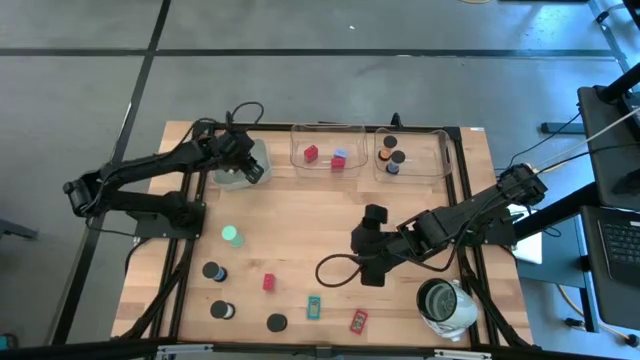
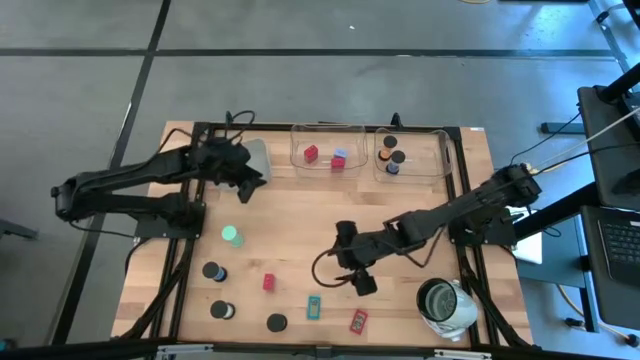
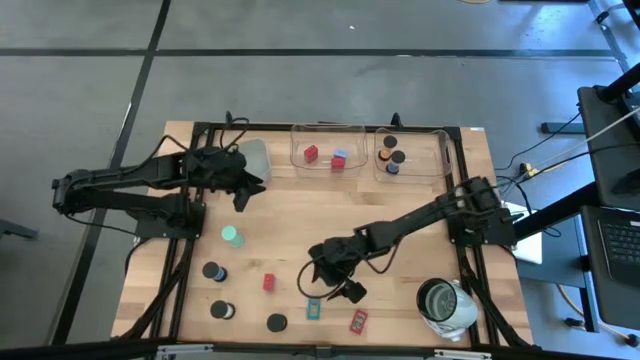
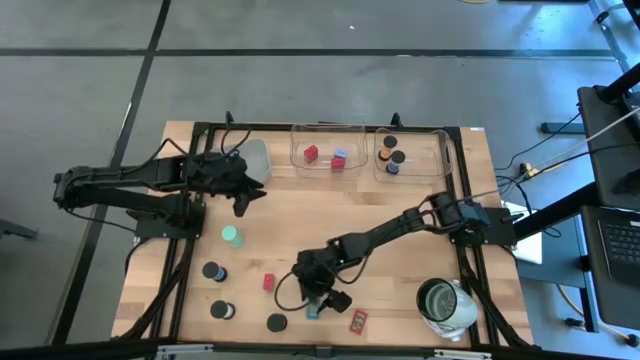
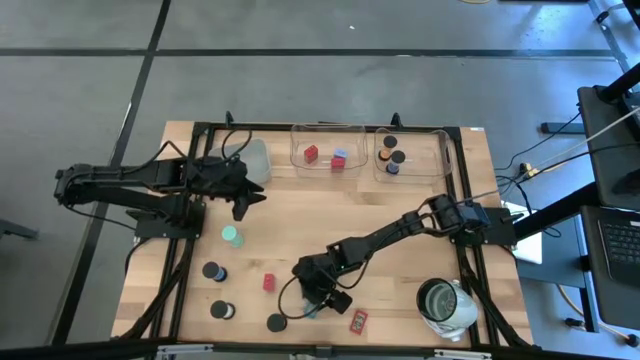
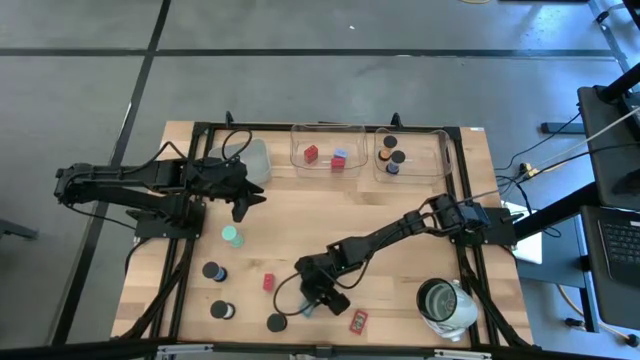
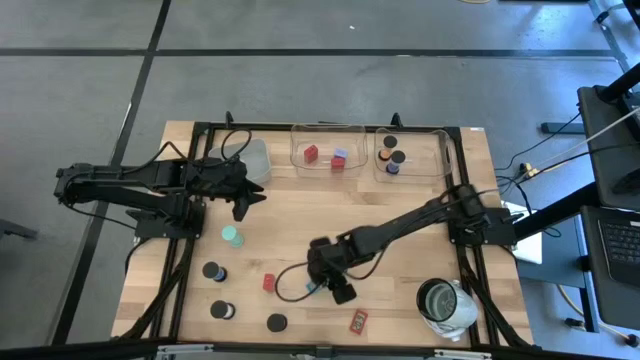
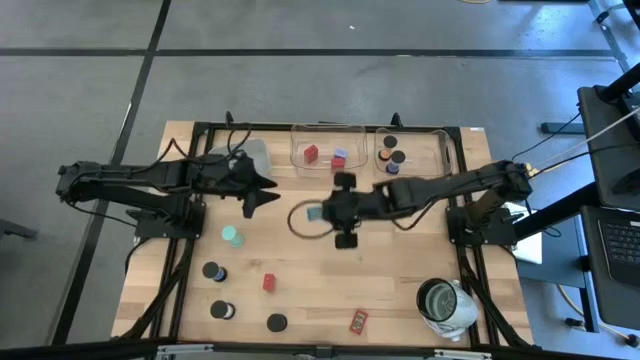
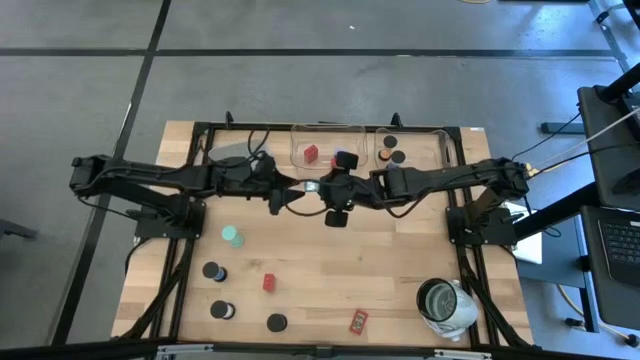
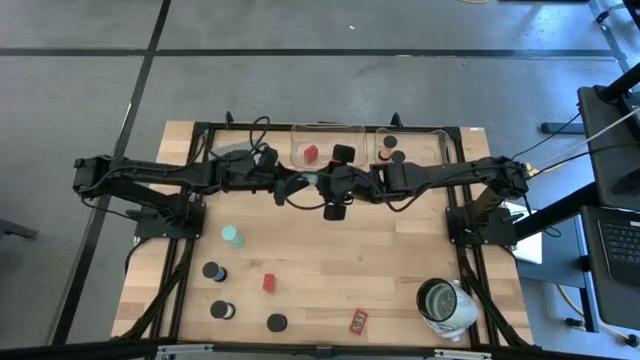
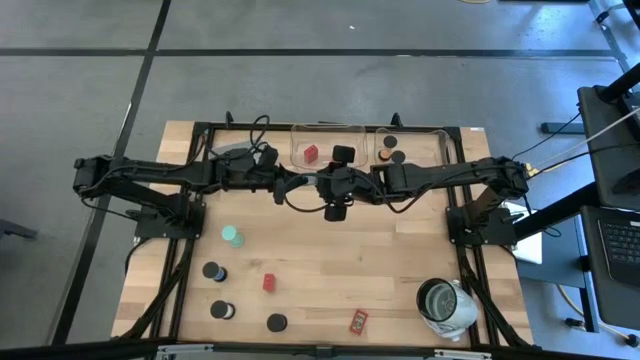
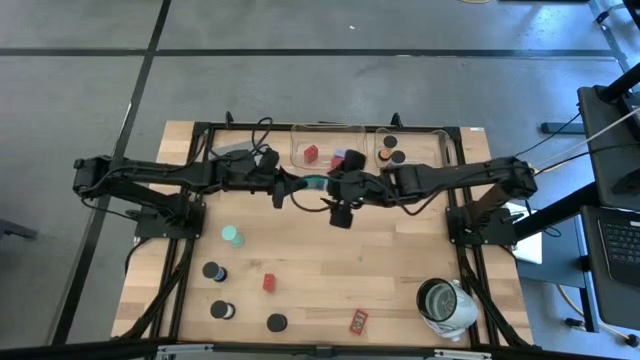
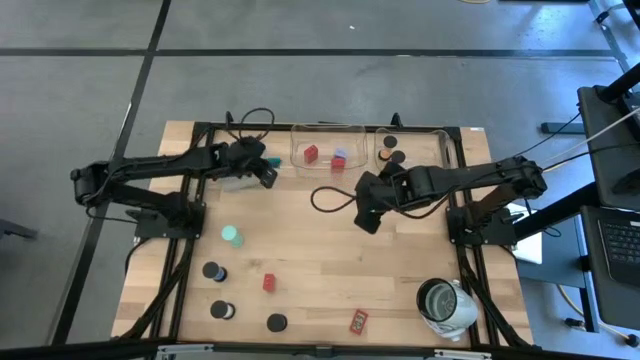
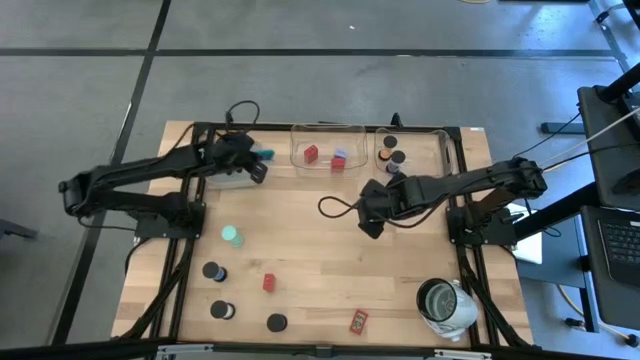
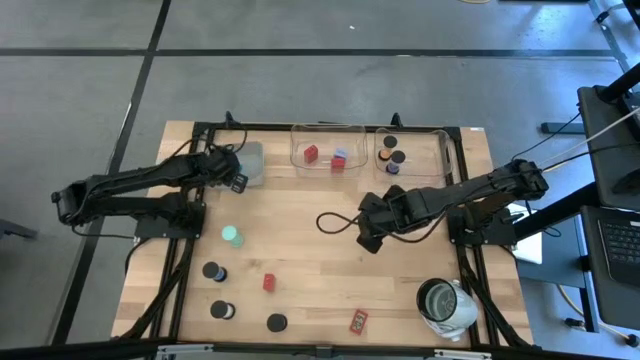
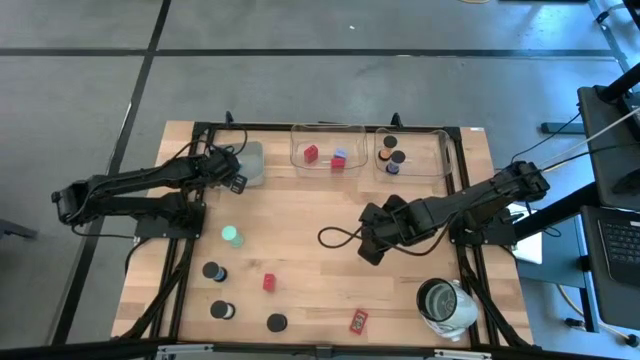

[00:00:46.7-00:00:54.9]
Task: Pick & Place Office items
Put the blue digital timer into the gray bin

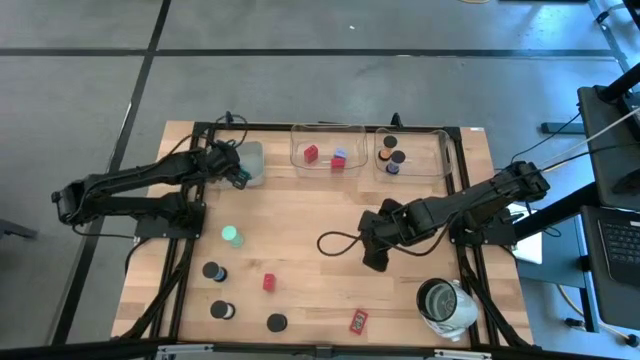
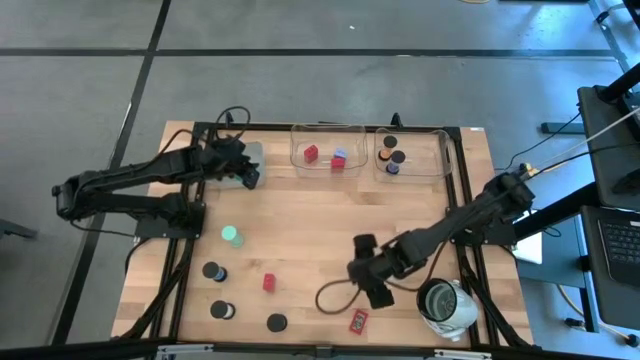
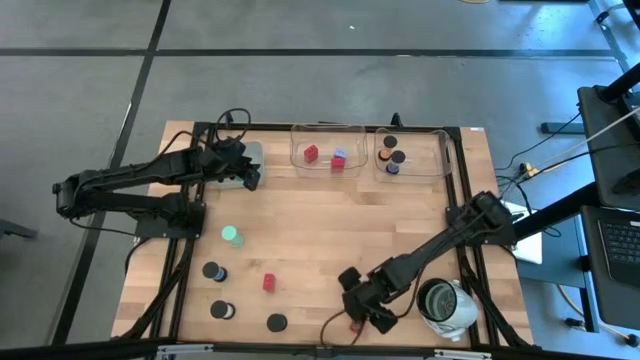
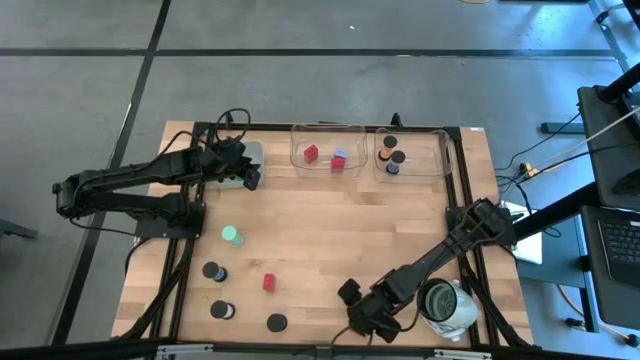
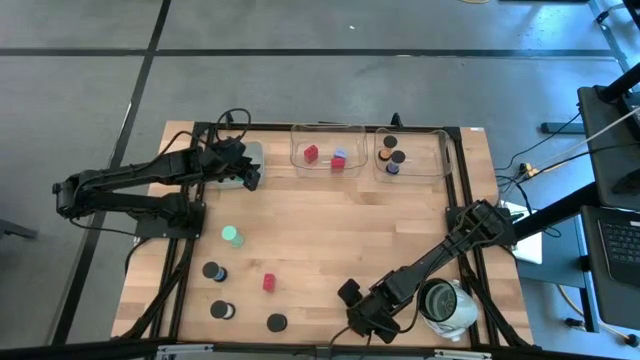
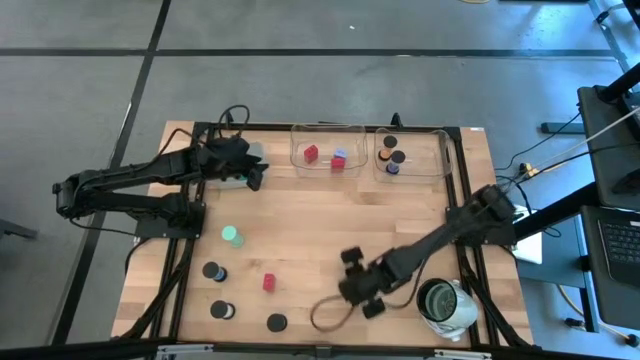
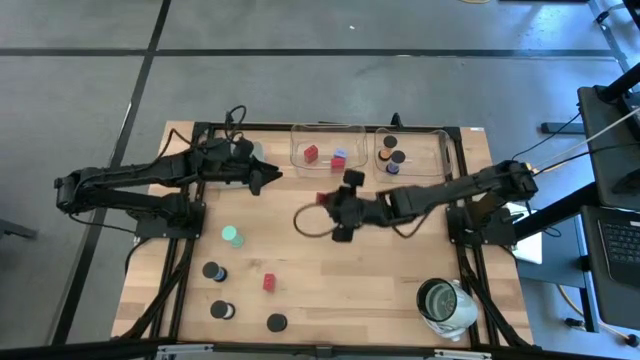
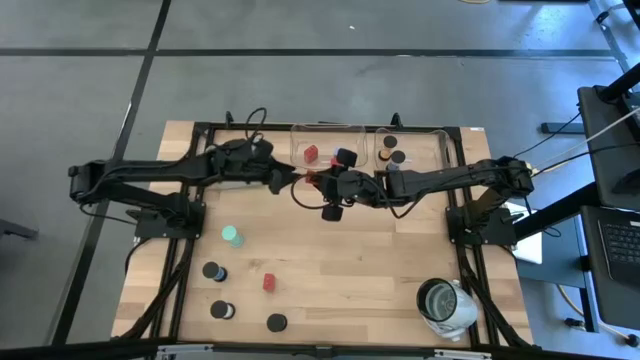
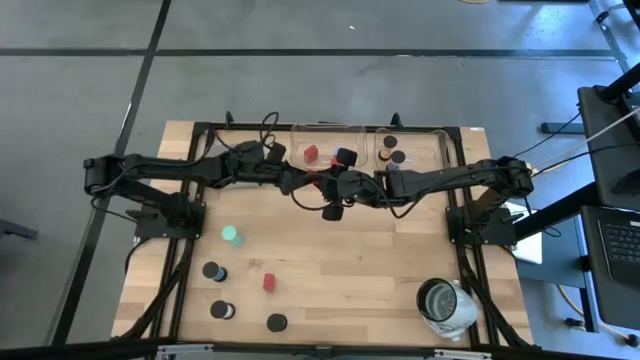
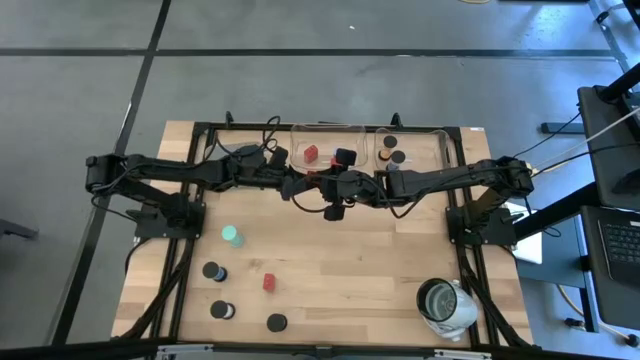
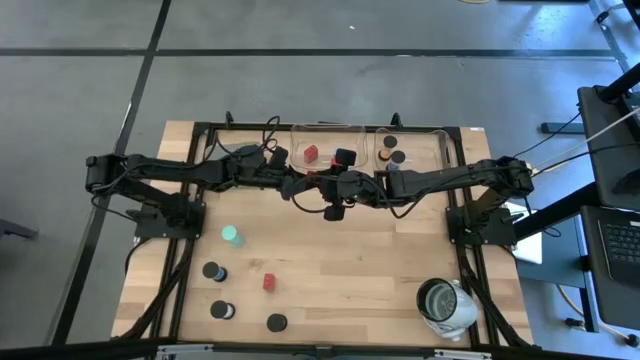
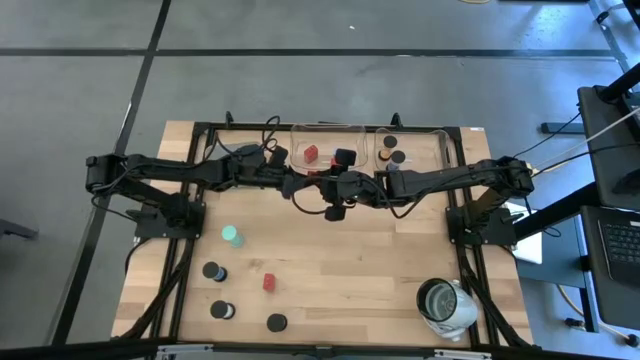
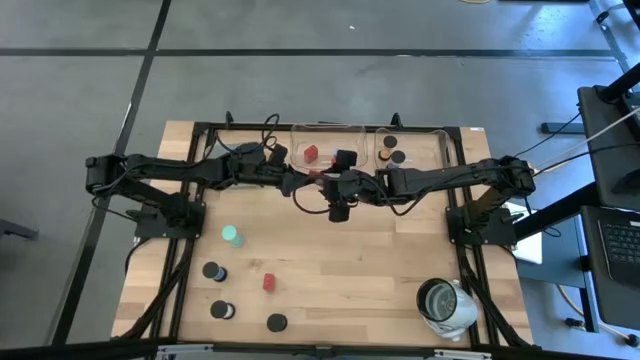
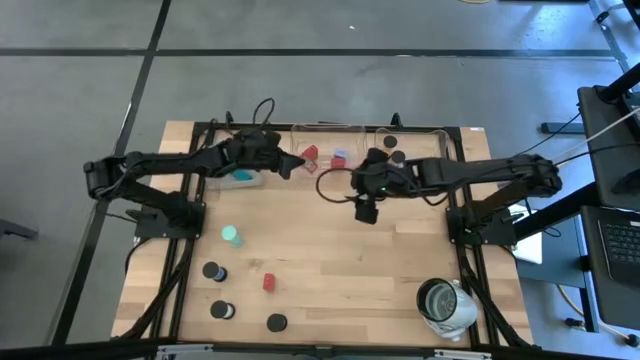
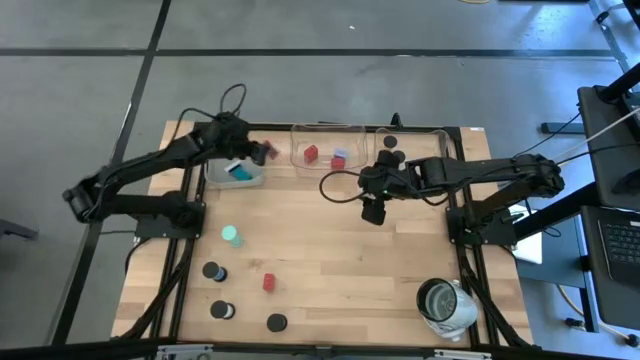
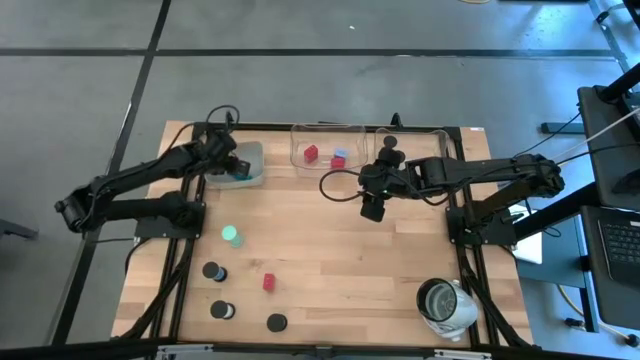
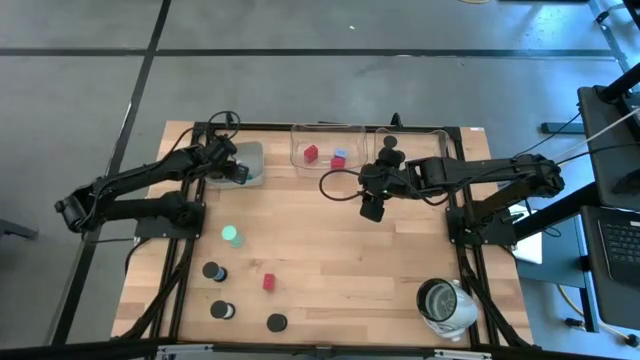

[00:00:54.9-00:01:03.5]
Put the red digital timer into the gray bin

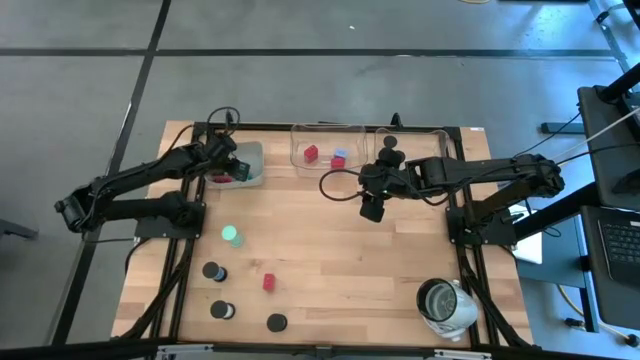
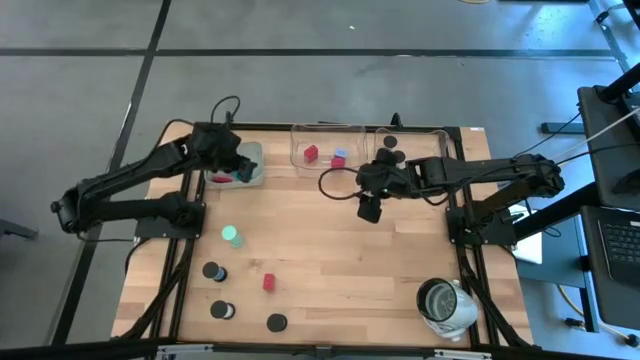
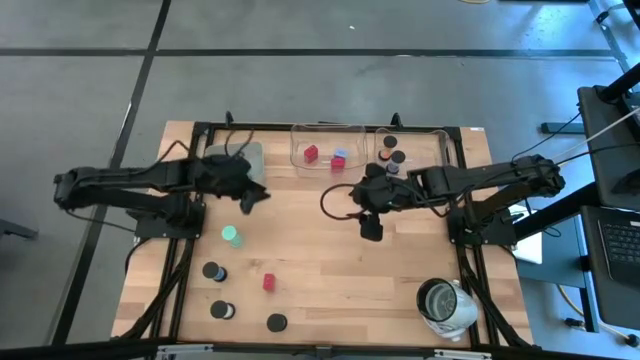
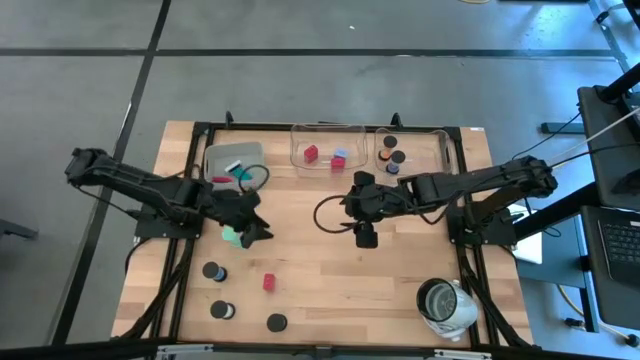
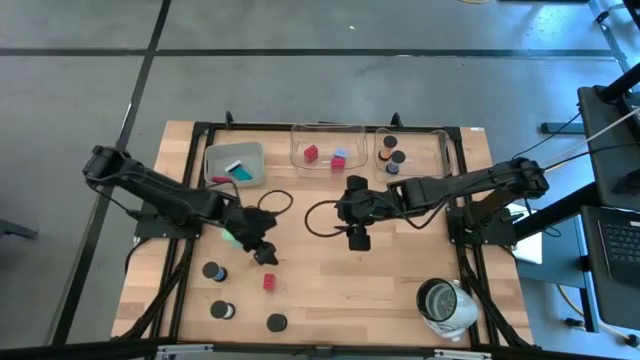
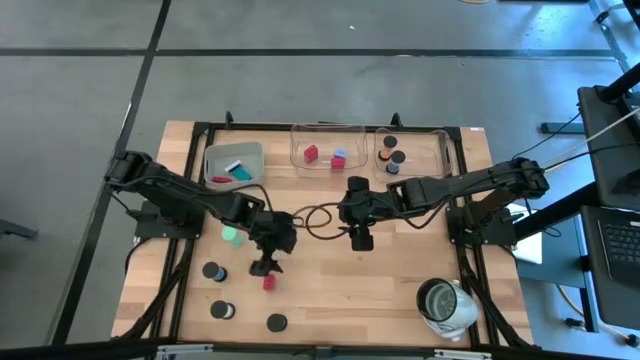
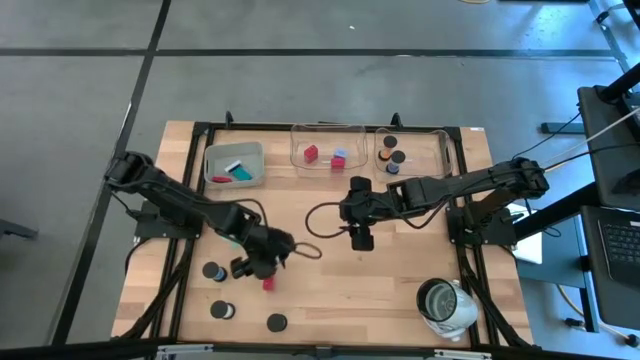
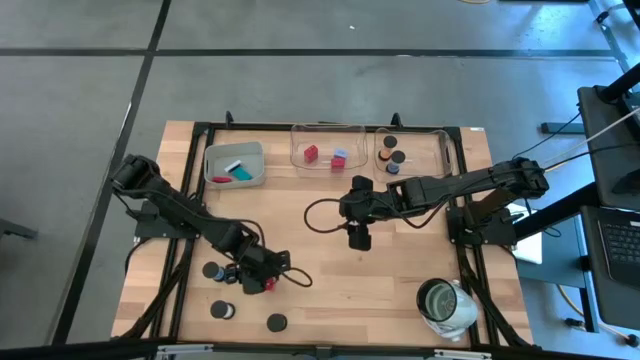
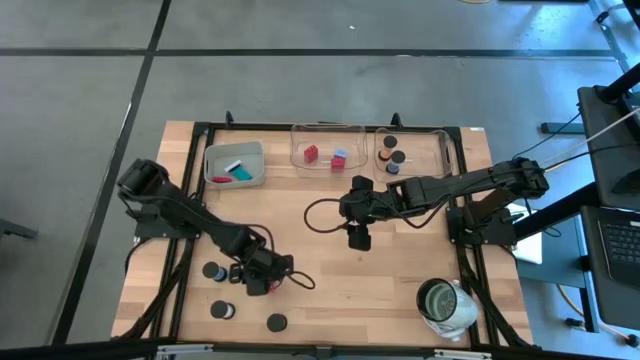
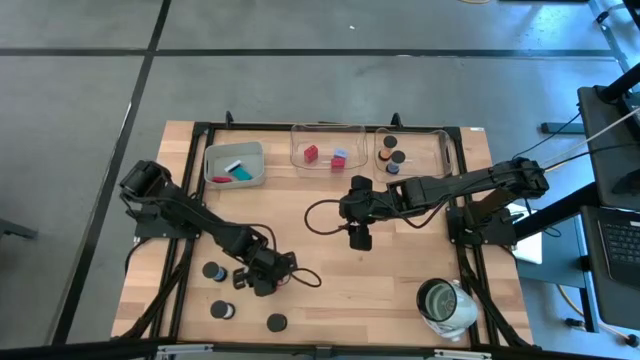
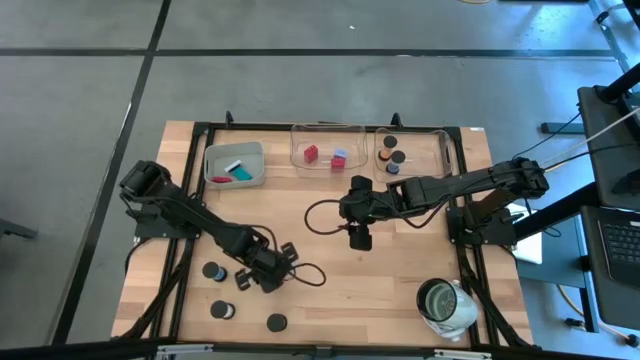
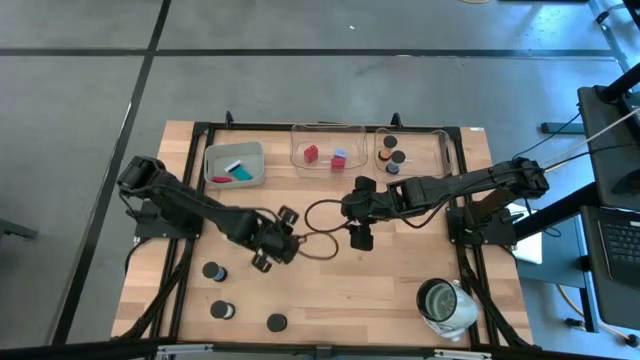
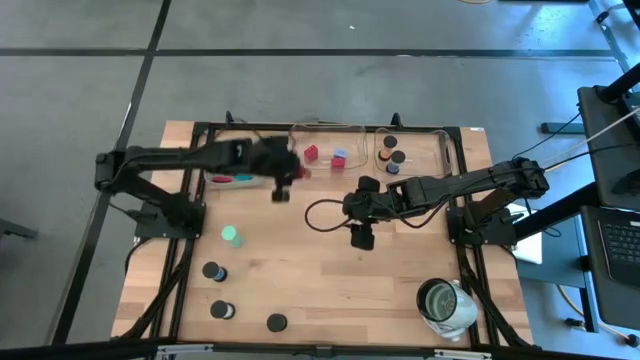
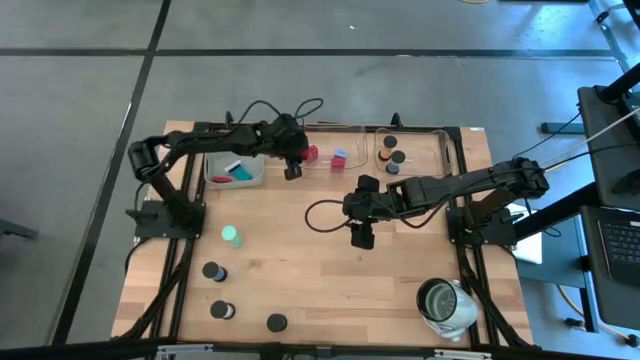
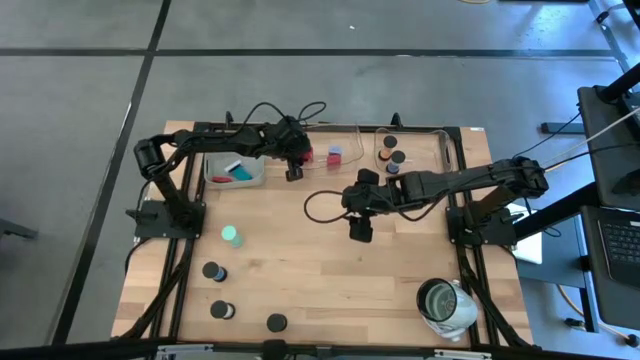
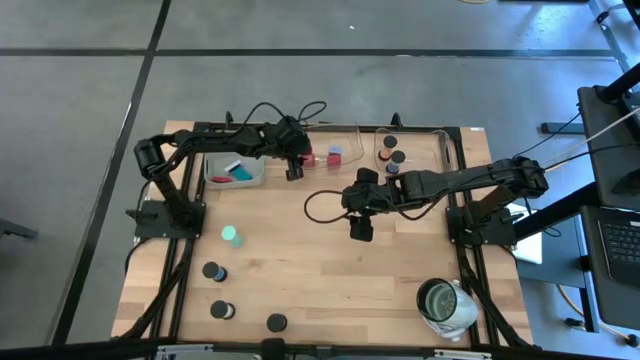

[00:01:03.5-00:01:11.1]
Put the red adapter into the left transparent bin
